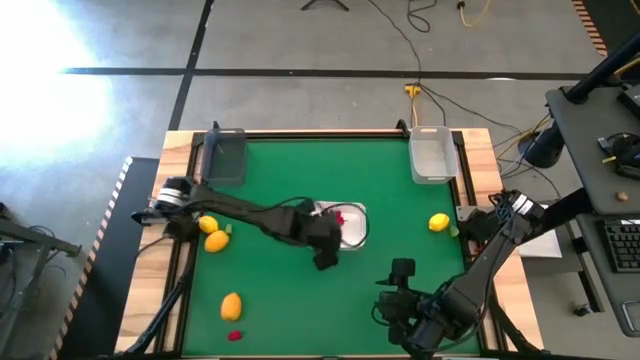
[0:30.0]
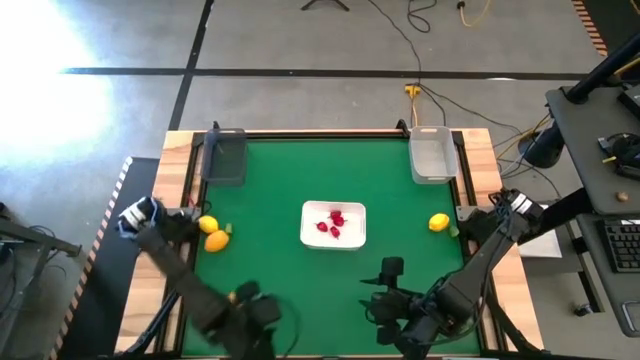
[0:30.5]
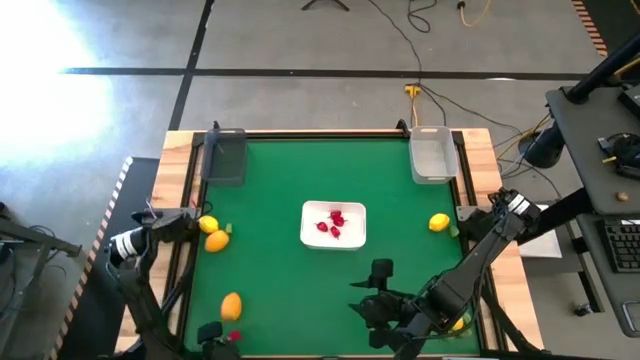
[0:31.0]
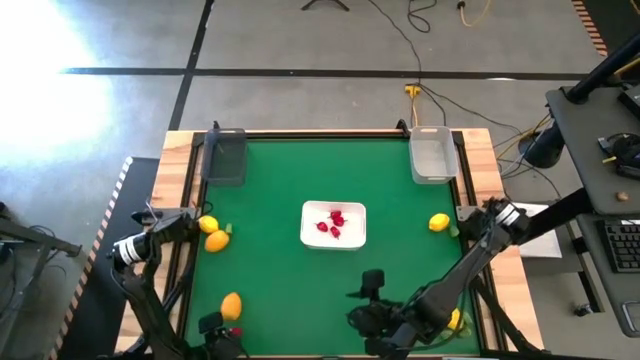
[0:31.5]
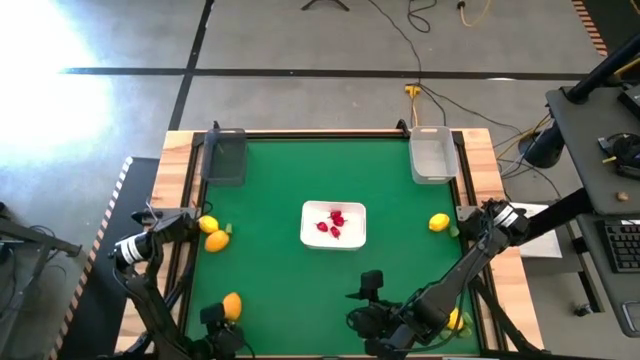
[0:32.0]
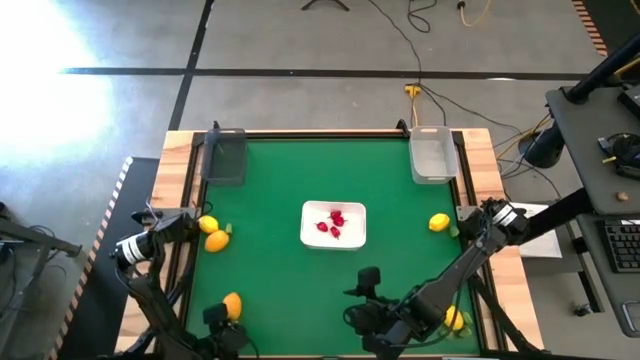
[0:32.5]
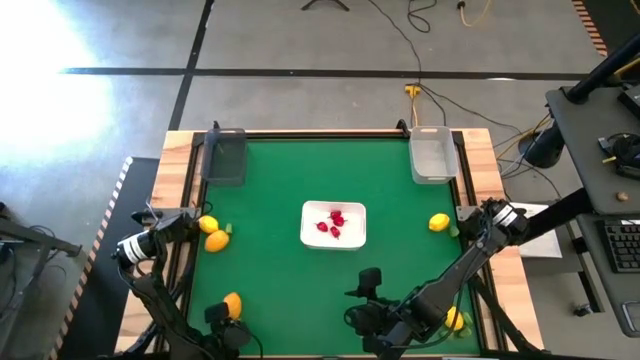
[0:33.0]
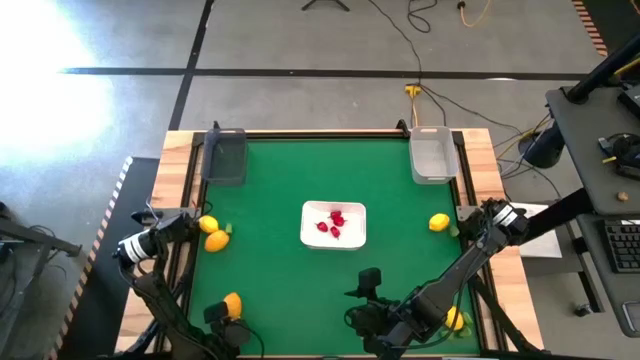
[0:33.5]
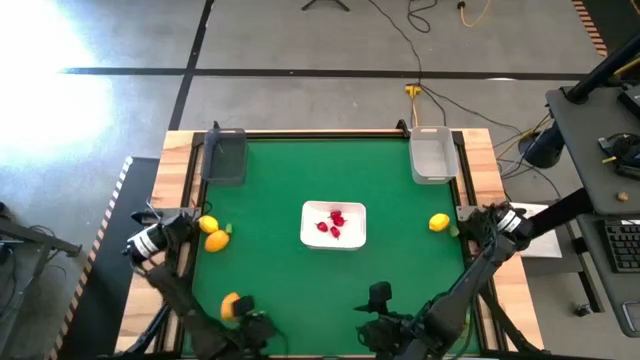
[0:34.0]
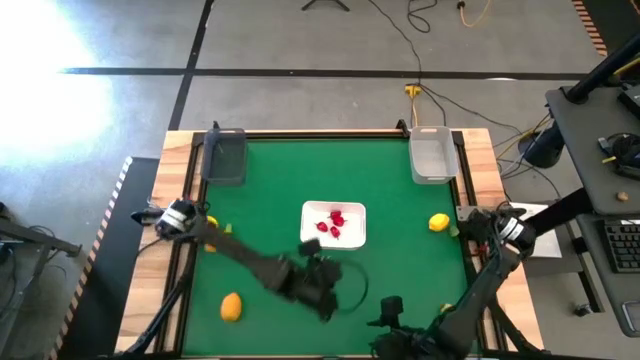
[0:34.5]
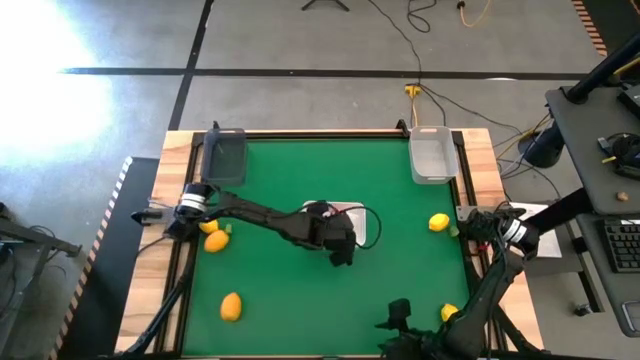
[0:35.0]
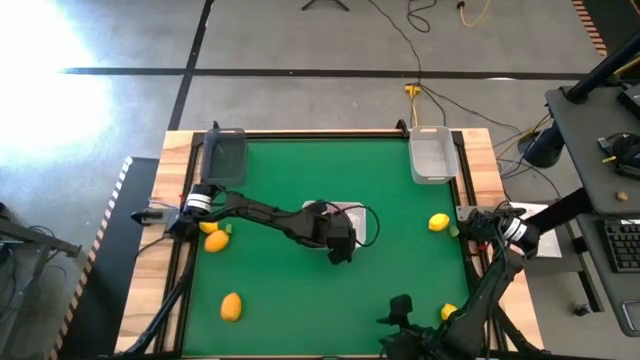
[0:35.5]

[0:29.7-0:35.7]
Task: Sort produce into baskets
Put the red chili pepper into the white bin

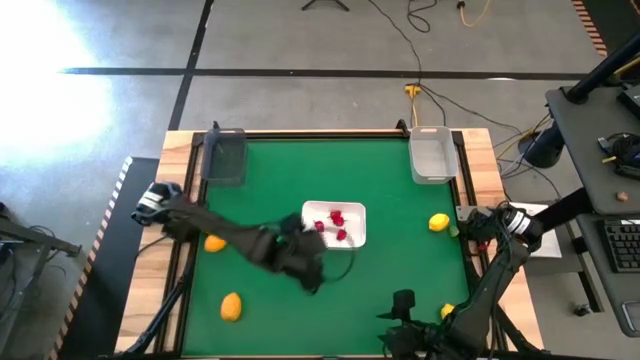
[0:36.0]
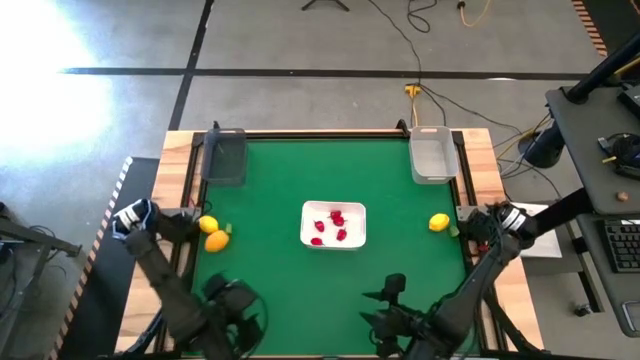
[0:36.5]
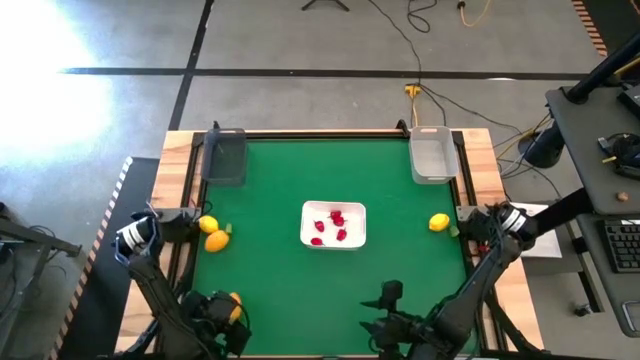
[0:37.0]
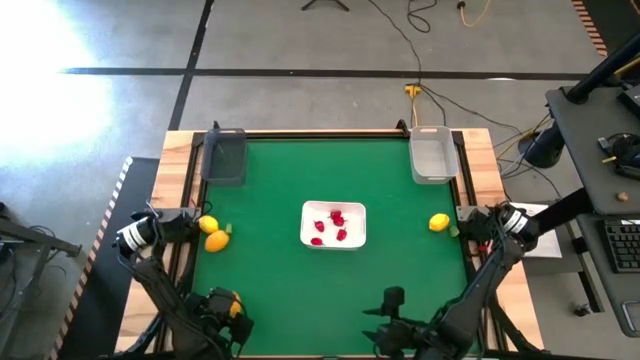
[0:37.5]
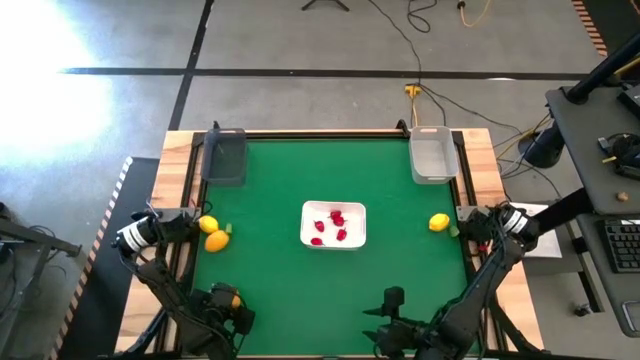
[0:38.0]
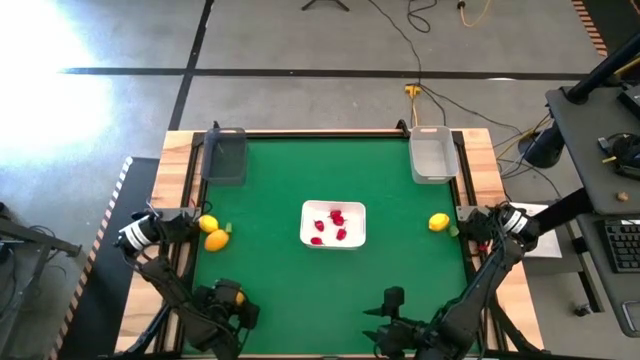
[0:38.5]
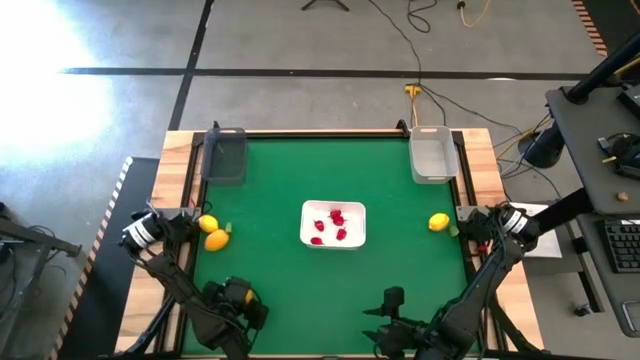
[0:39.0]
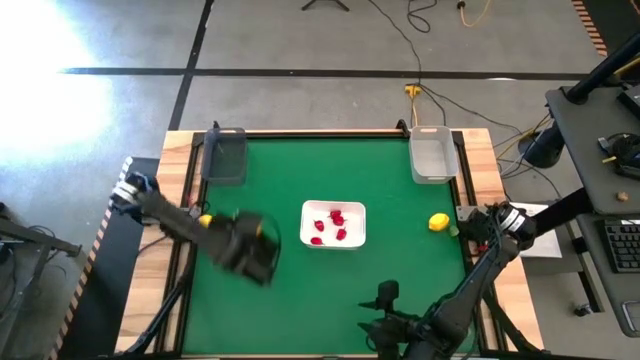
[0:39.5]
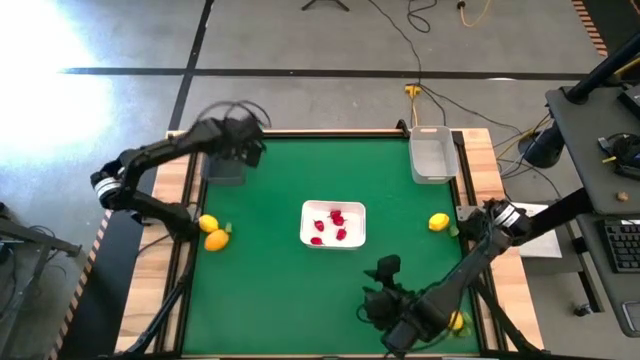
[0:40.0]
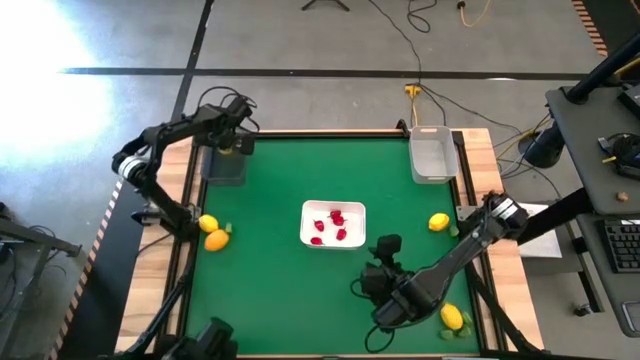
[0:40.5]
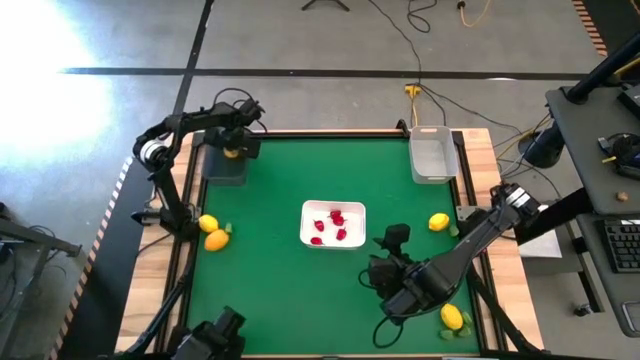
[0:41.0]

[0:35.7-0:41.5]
Put the yellow lemon into the black bin

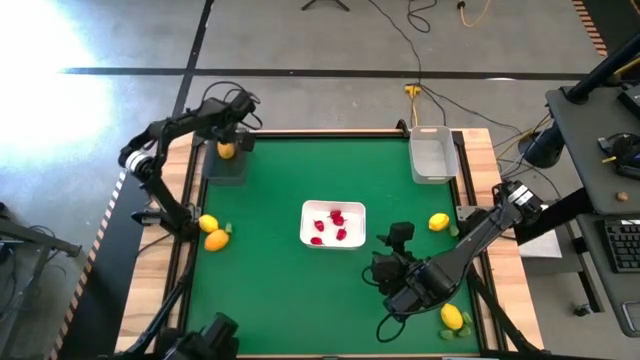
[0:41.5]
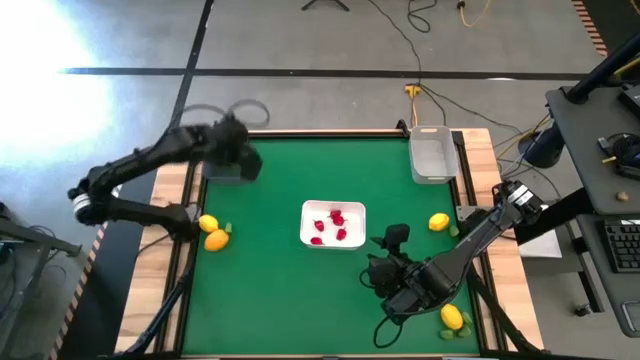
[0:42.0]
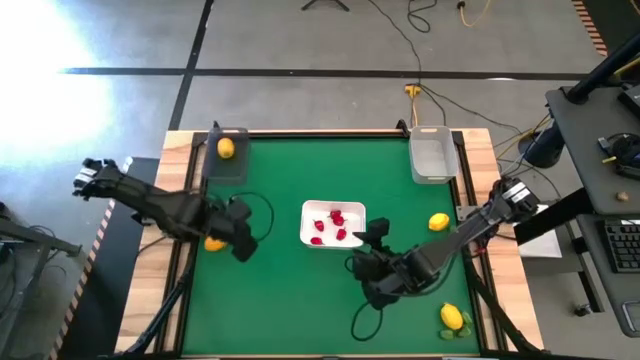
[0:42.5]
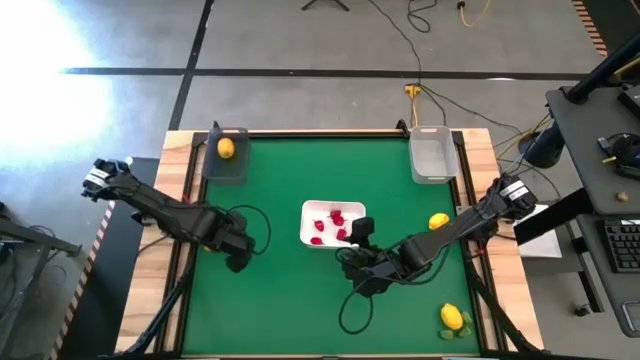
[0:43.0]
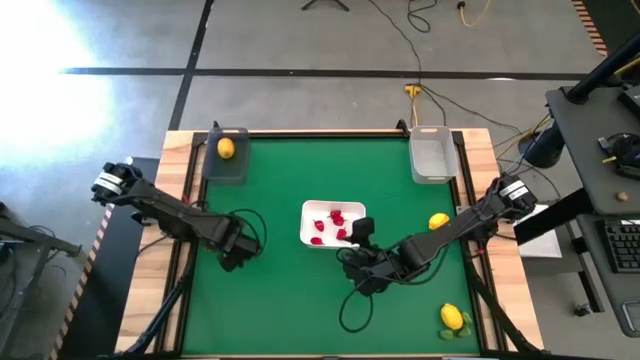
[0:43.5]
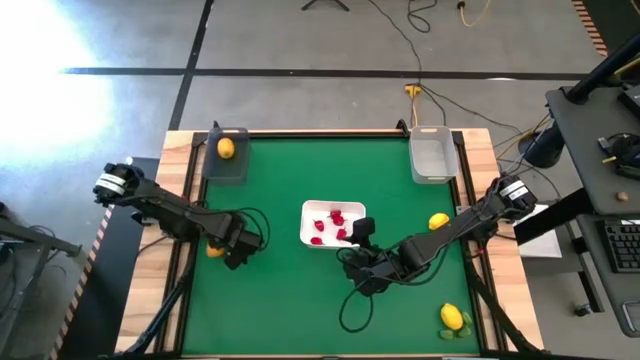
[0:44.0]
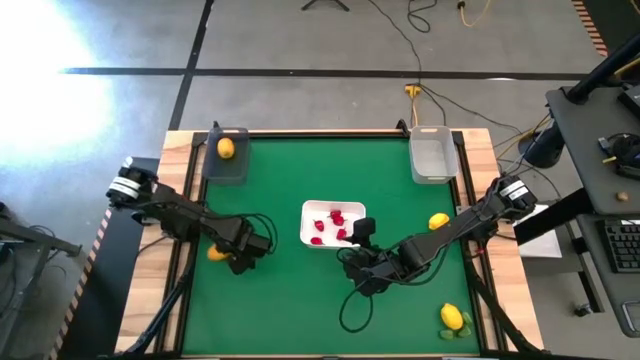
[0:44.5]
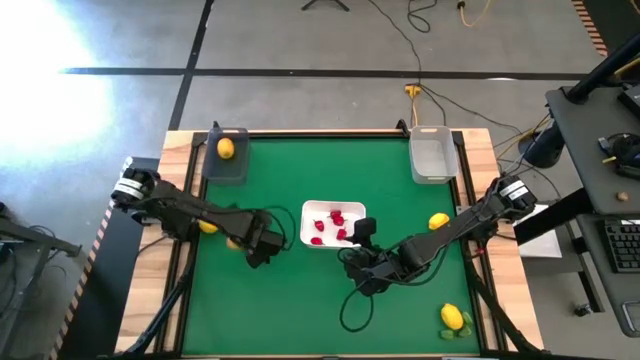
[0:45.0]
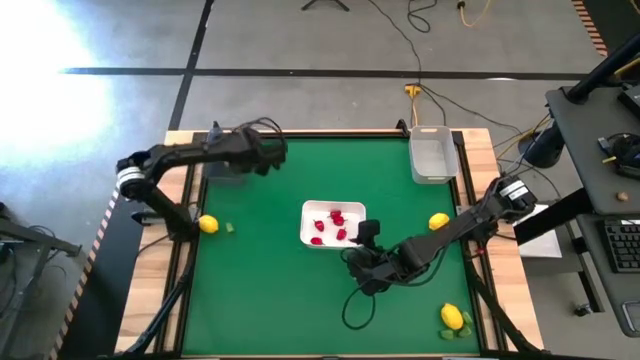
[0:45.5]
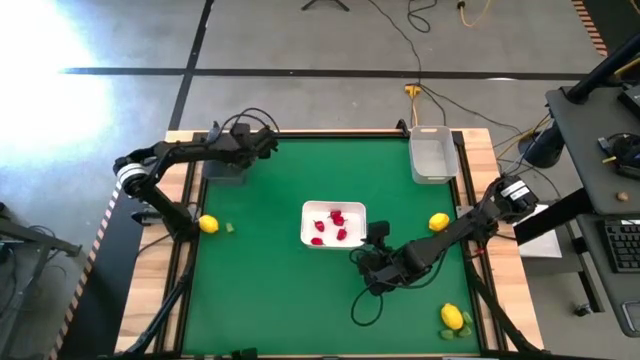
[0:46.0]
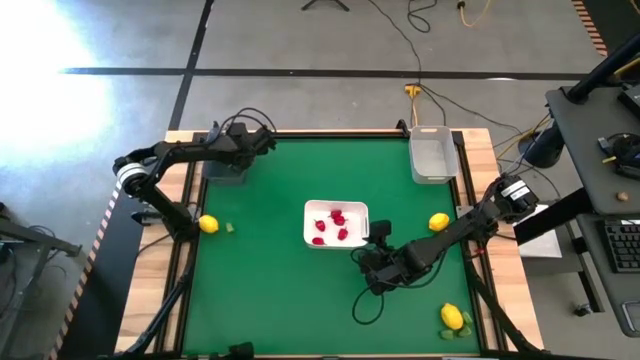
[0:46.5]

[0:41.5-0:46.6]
Put the yellow lemon into the black bin

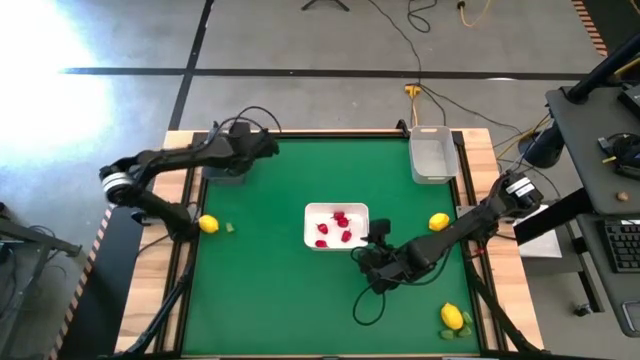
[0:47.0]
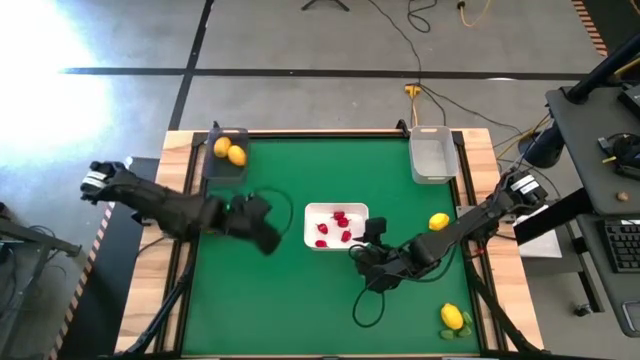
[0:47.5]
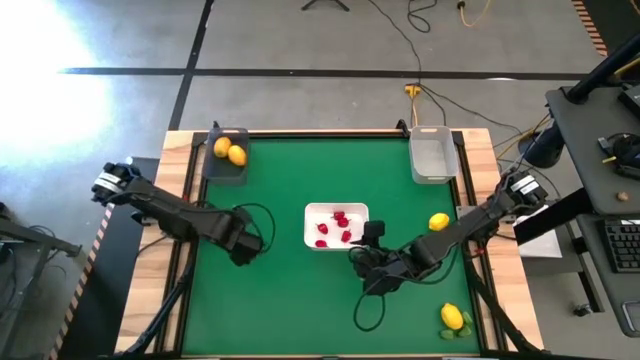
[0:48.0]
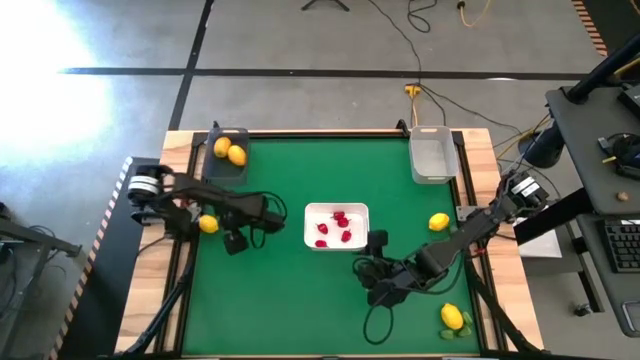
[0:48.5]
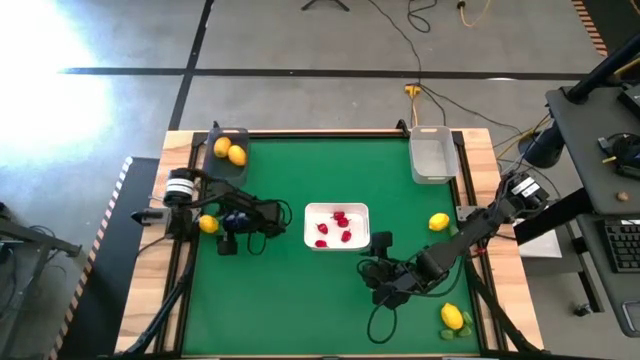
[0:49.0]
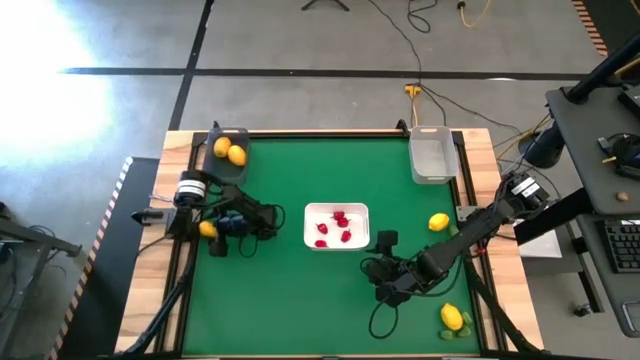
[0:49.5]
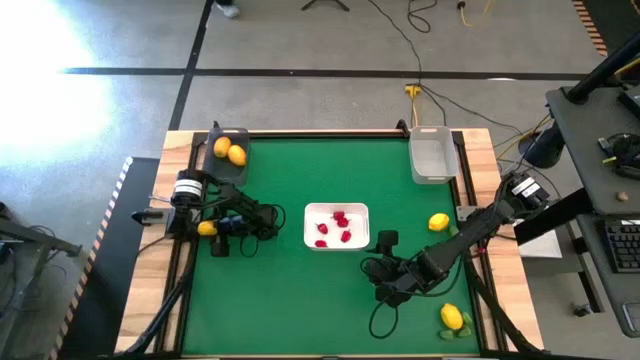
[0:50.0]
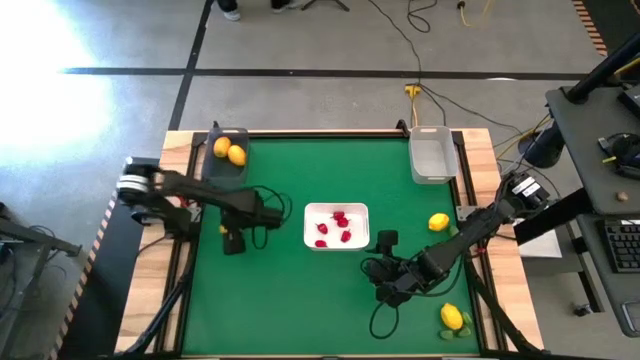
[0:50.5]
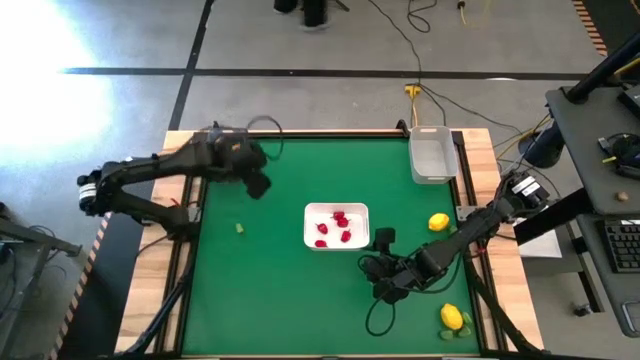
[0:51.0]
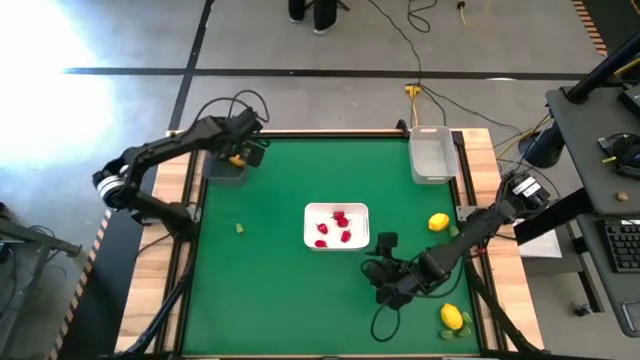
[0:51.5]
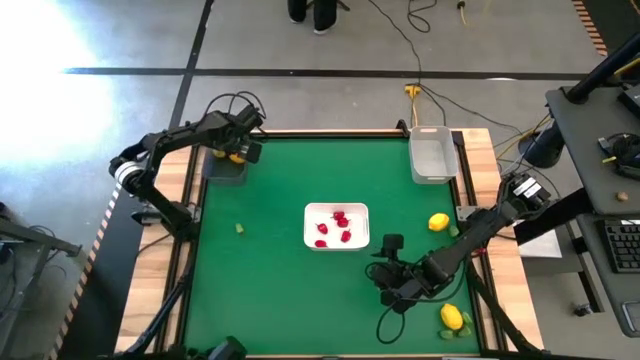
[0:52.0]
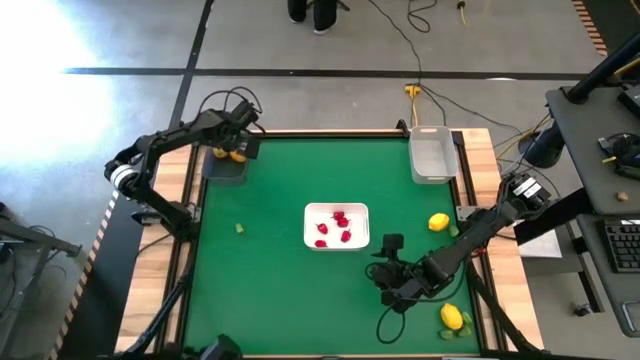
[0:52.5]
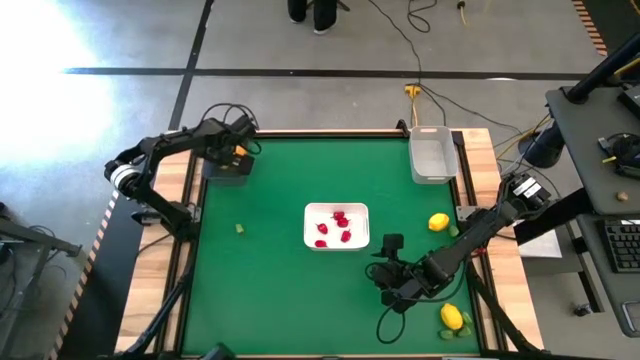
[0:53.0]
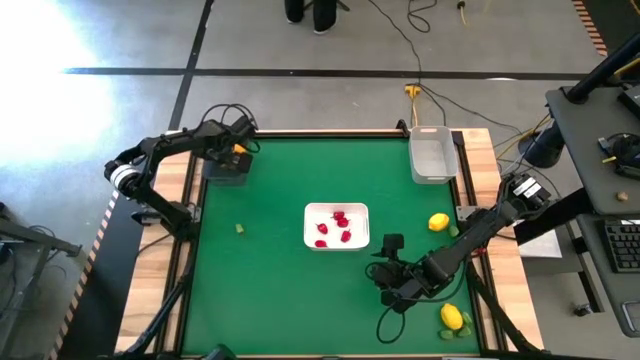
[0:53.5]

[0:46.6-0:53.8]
Put the yellow lemon into the black bin
